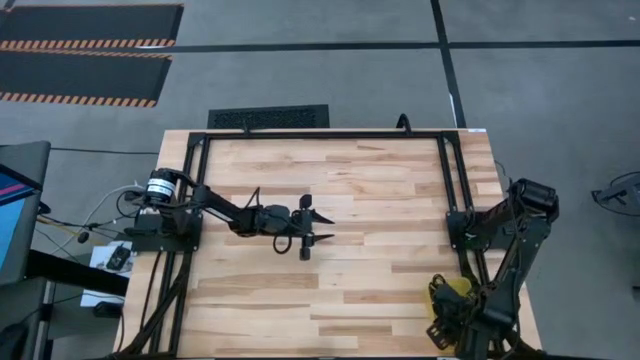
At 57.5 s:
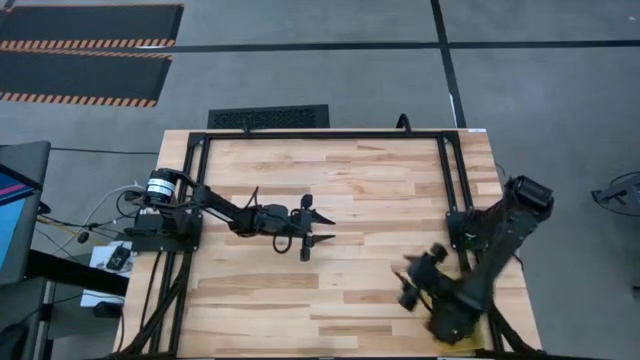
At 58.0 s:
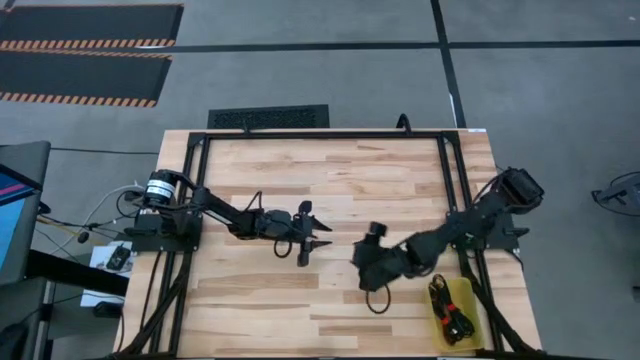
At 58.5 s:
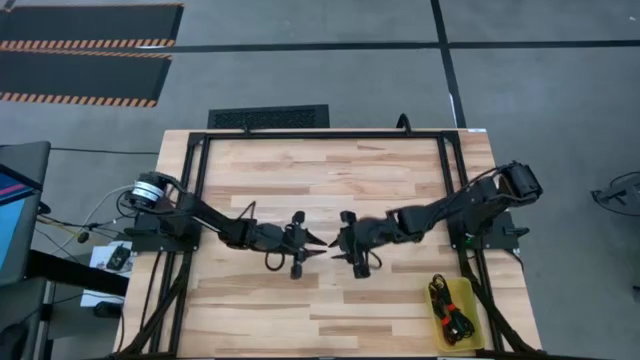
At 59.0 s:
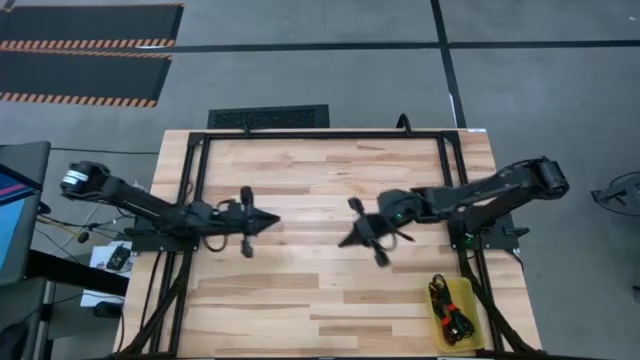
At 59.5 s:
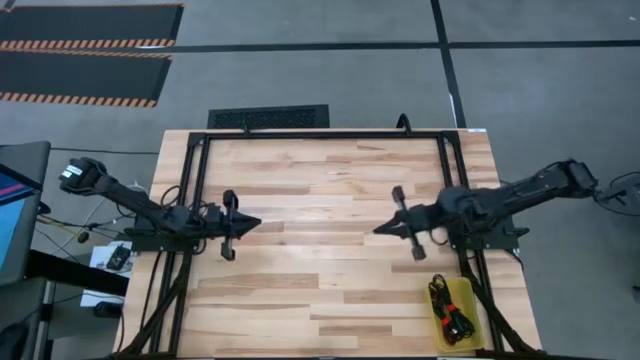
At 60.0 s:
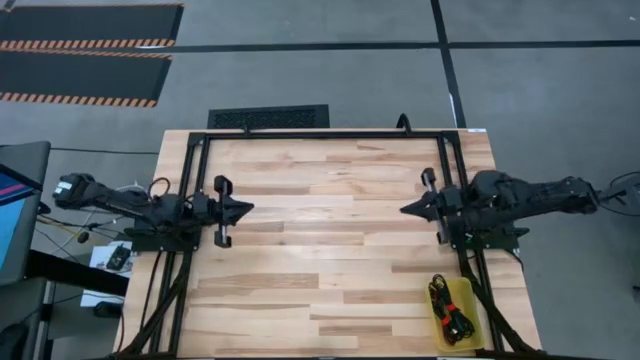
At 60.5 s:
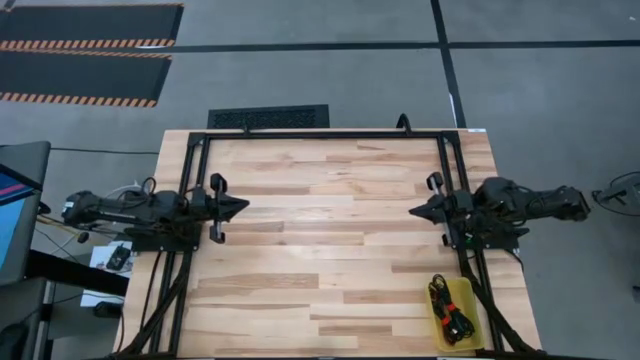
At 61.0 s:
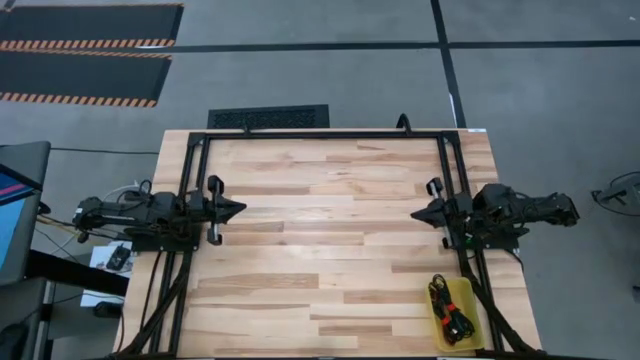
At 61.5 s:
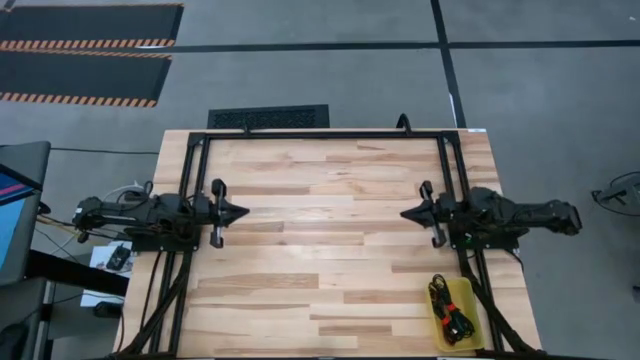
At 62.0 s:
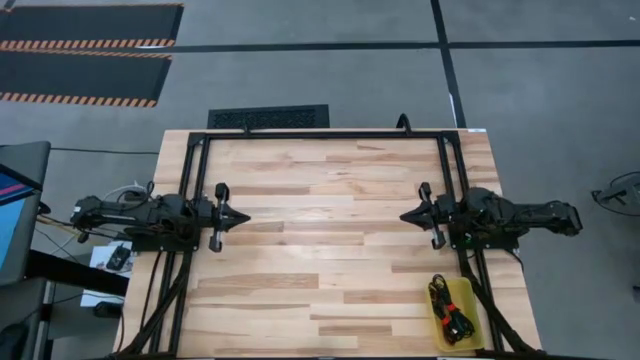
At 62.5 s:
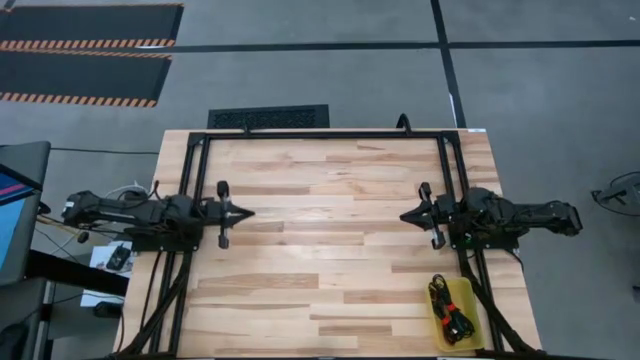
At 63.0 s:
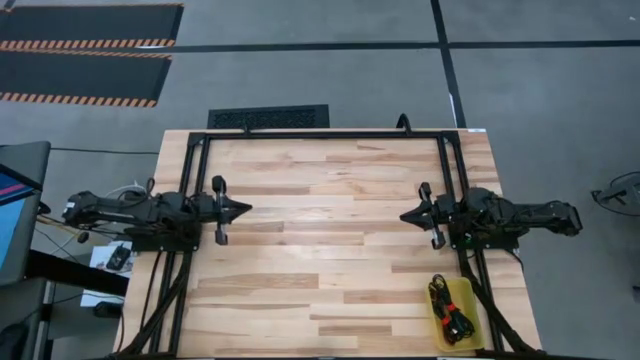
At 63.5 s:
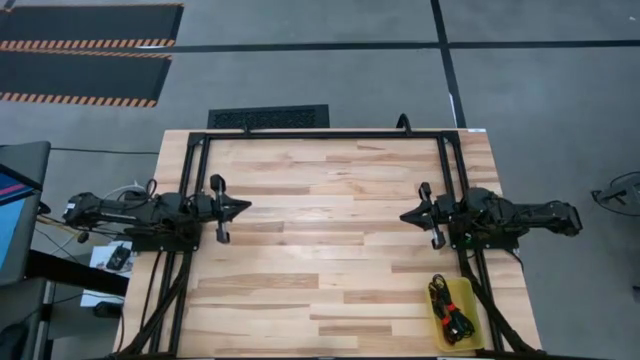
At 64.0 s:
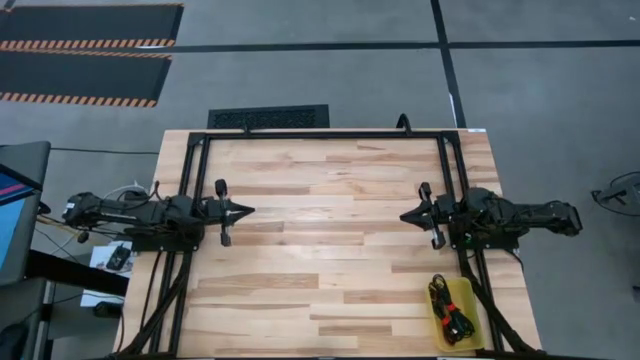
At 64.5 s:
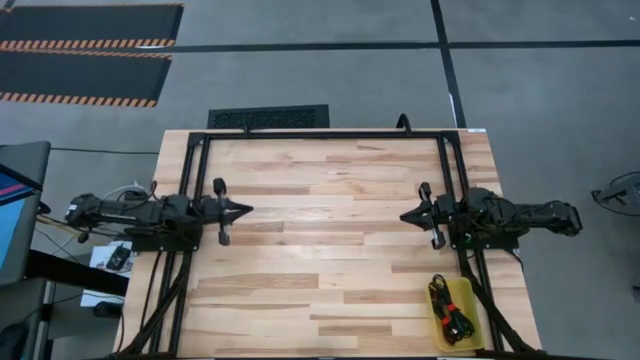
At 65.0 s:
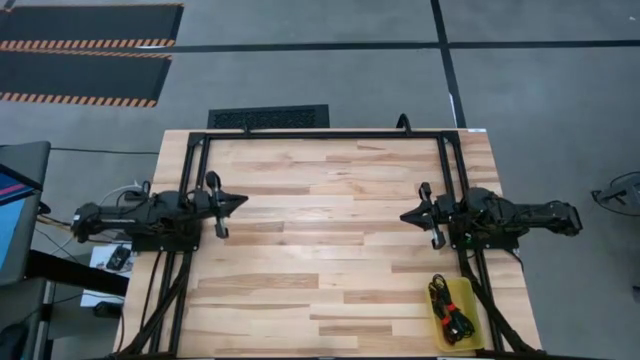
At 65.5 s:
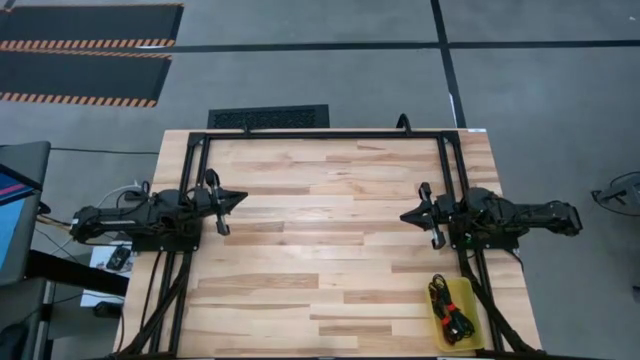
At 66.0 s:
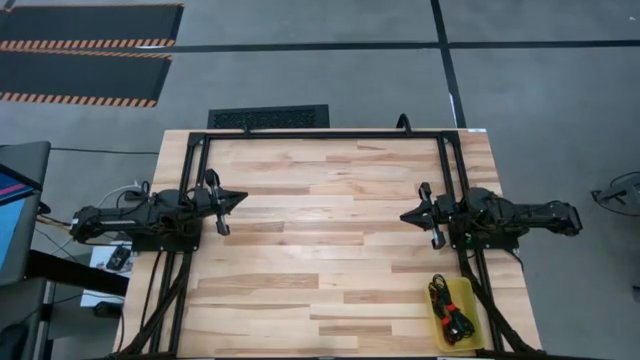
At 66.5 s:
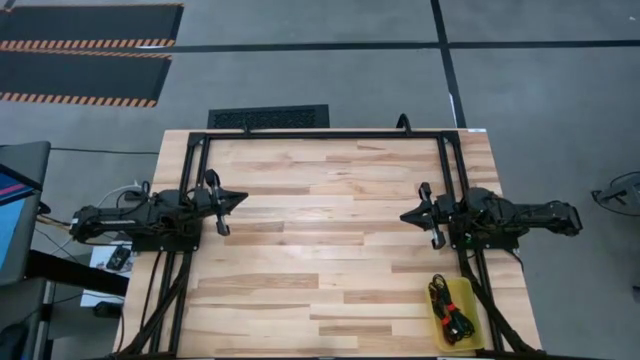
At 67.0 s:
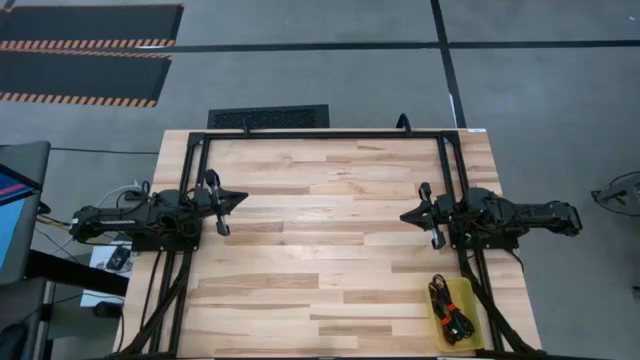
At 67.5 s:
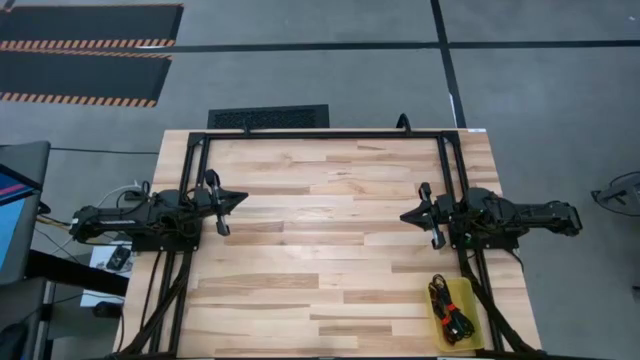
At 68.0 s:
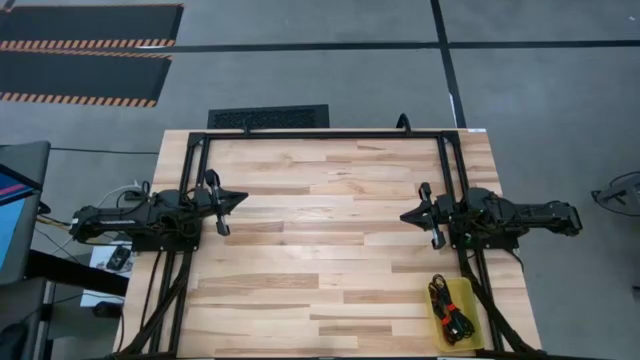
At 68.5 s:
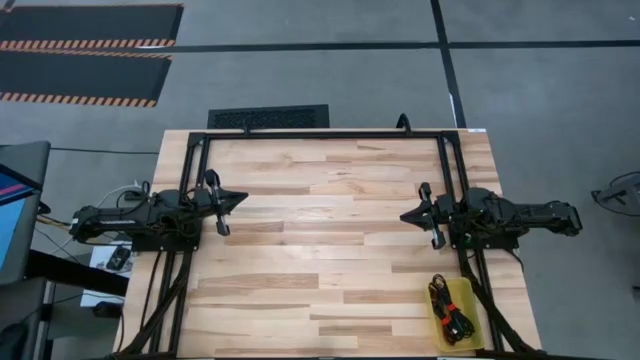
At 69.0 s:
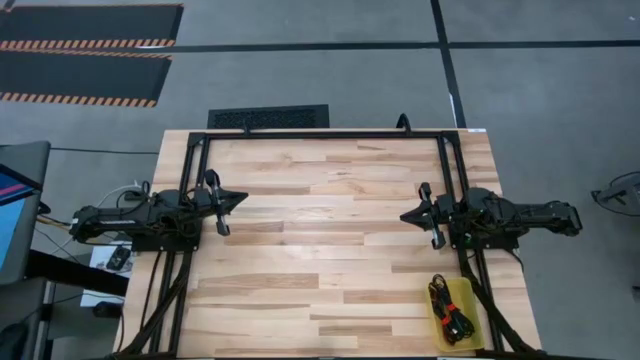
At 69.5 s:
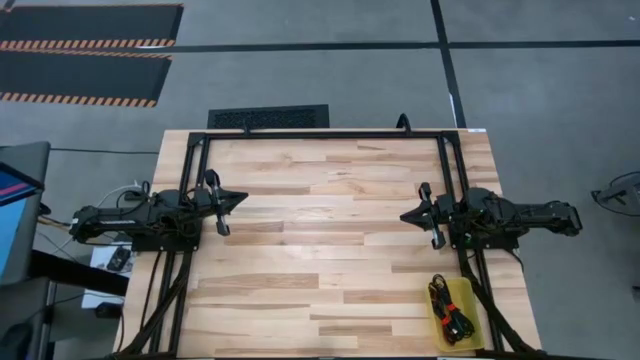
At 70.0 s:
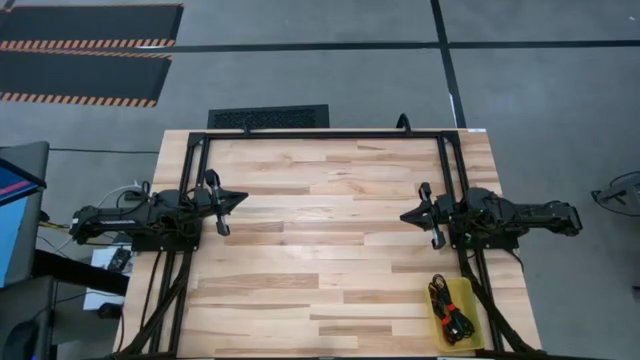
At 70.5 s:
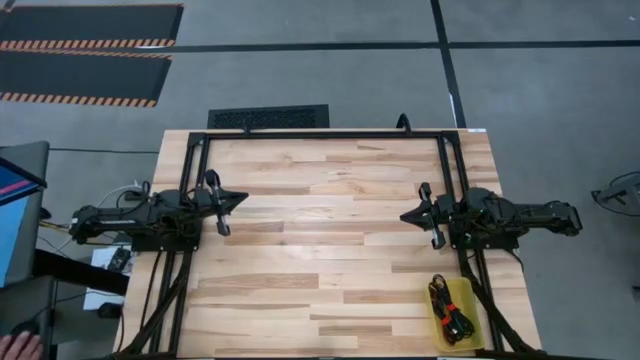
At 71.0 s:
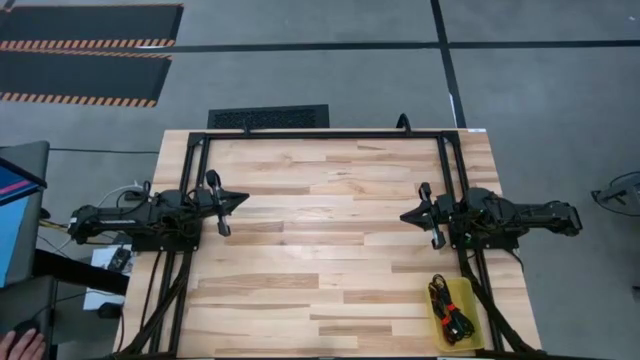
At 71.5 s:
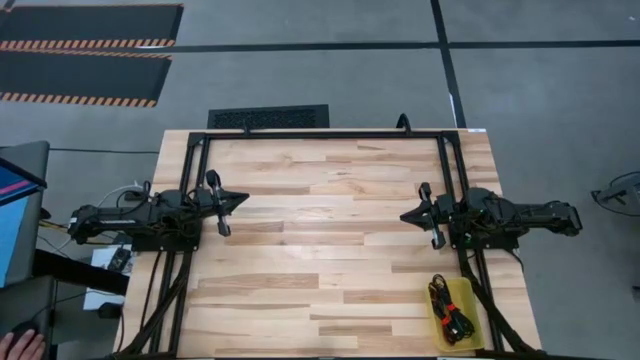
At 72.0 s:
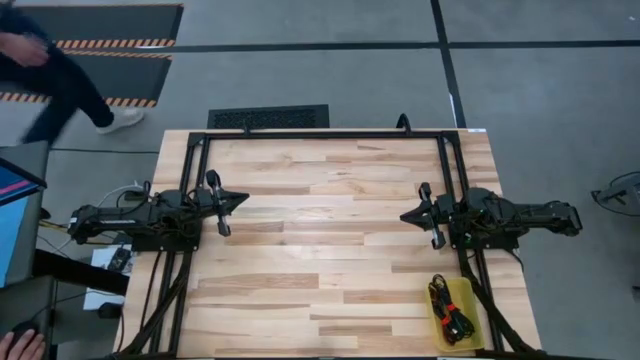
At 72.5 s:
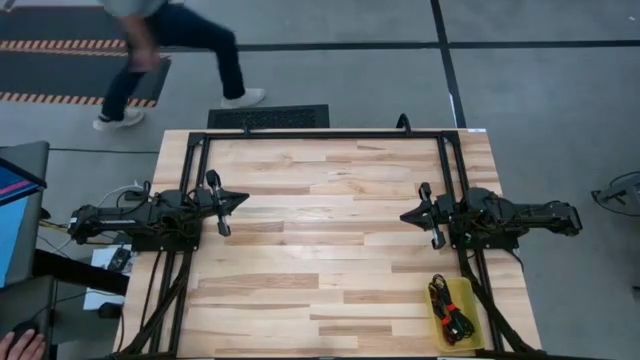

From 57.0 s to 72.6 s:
Task: Pick and place USB-C Cables
Return to Home Position

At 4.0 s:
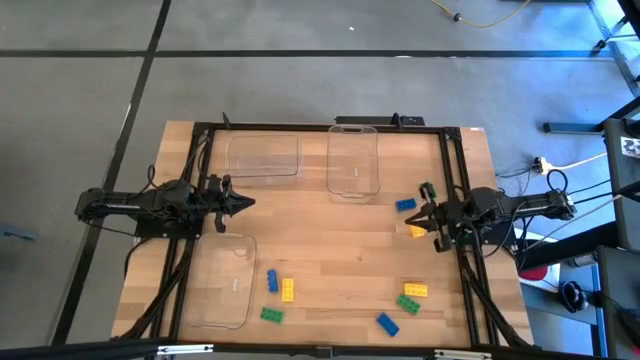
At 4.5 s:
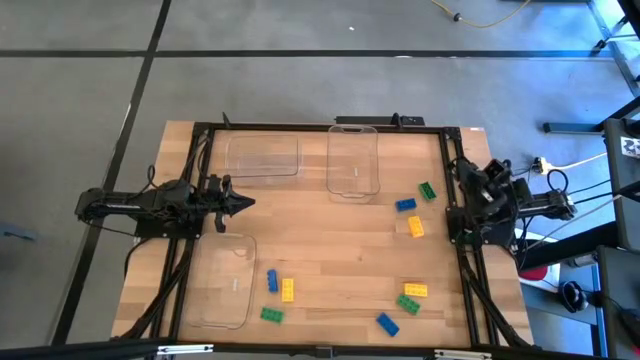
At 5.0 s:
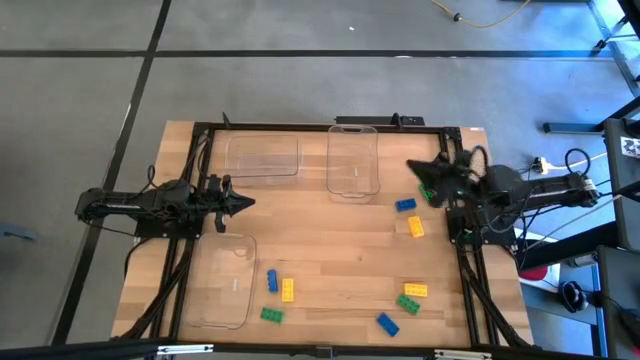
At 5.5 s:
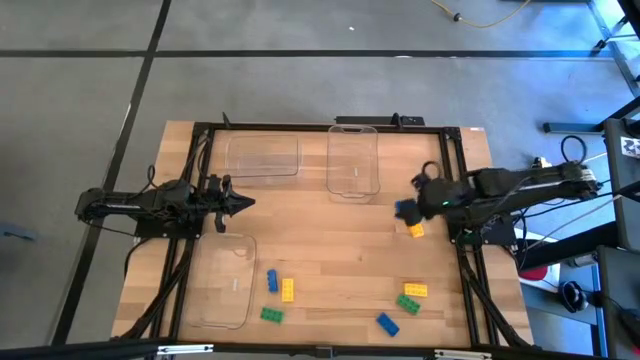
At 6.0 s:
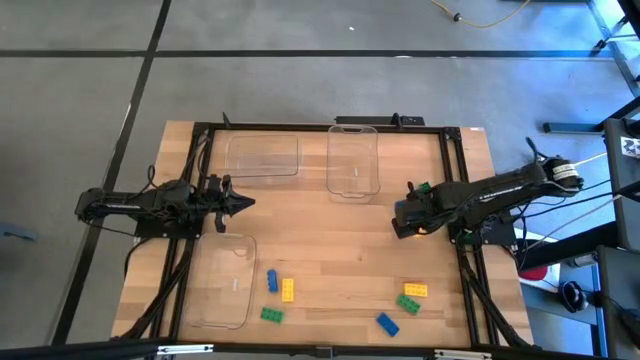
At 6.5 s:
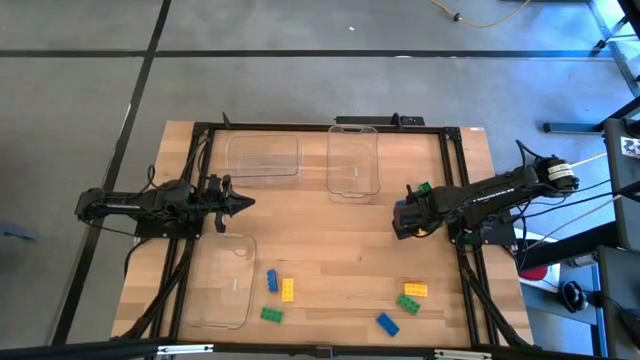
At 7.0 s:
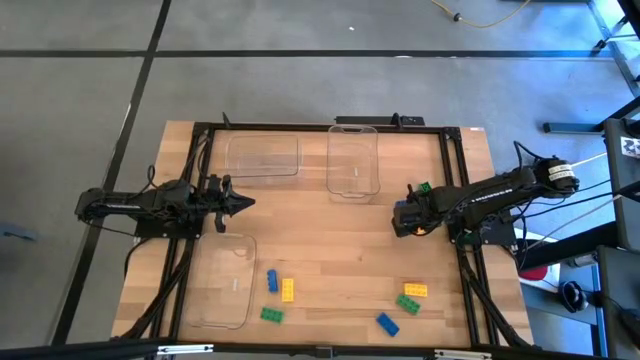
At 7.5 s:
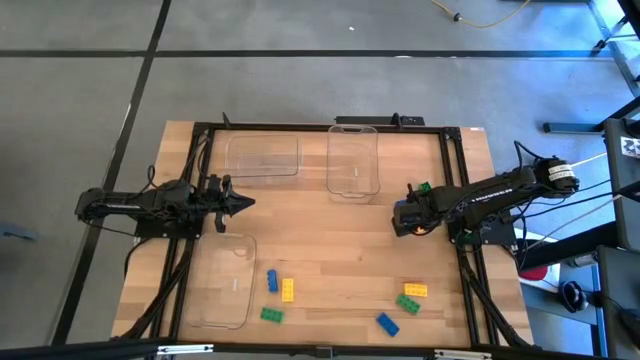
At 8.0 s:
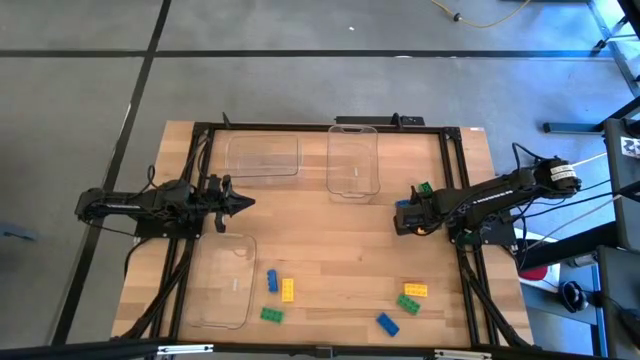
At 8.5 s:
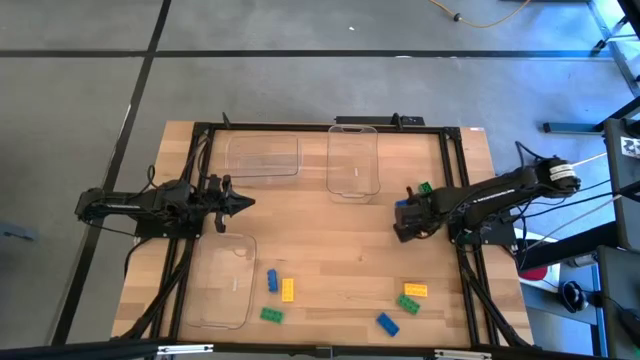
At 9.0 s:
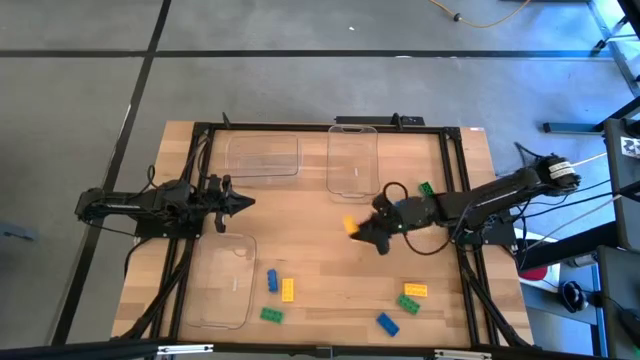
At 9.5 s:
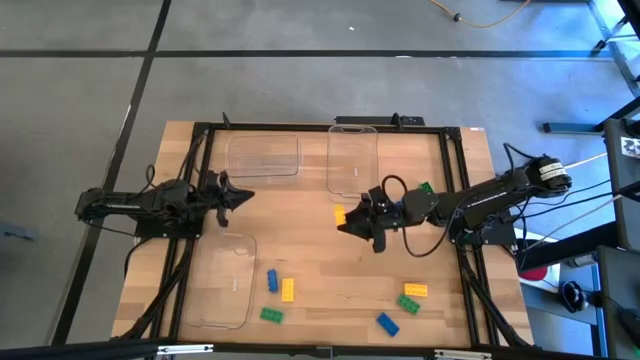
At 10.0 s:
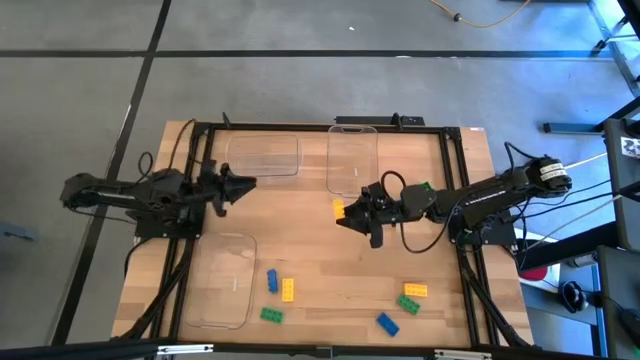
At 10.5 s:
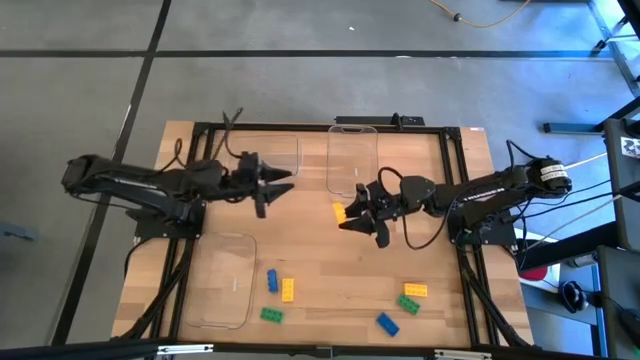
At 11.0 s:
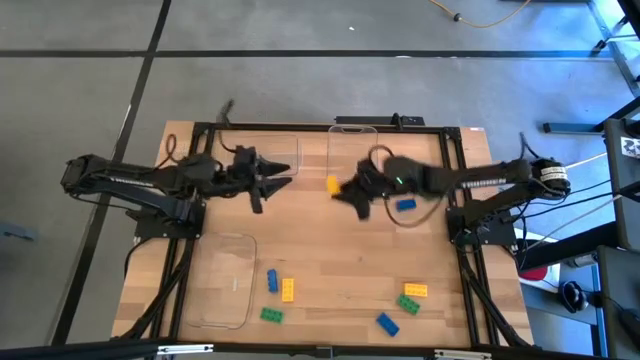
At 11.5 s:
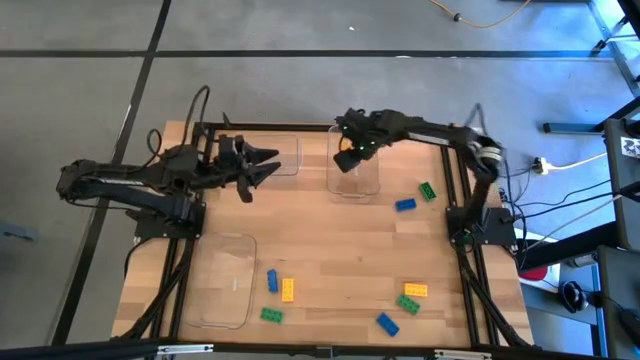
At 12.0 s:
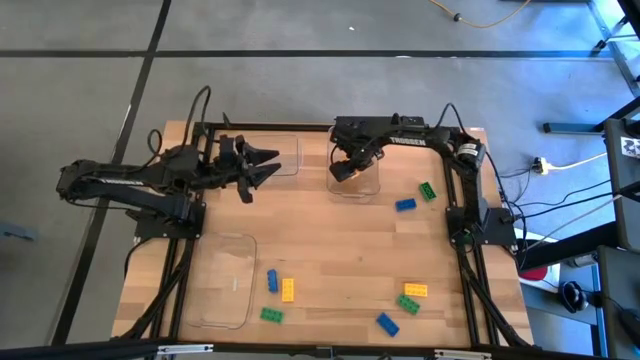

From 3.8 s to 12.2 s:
Task: Sort & place blocks by color
Put the top right yellow game piece into the top right transparent bin
